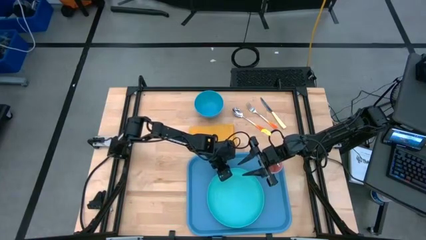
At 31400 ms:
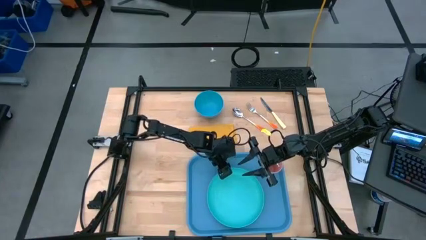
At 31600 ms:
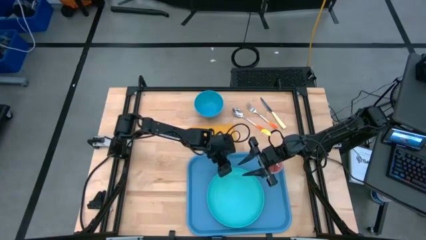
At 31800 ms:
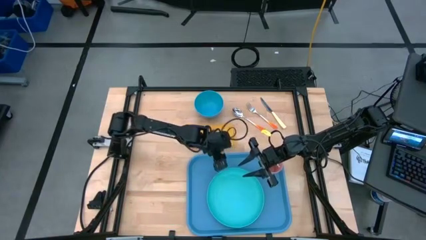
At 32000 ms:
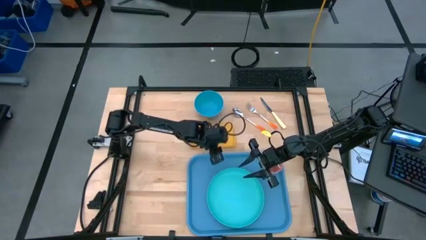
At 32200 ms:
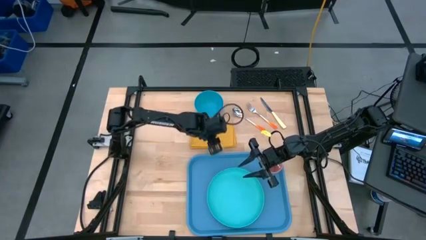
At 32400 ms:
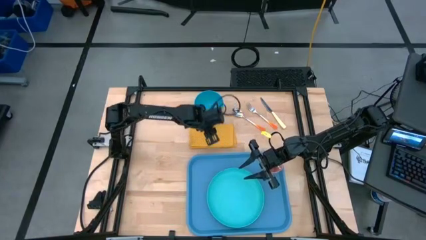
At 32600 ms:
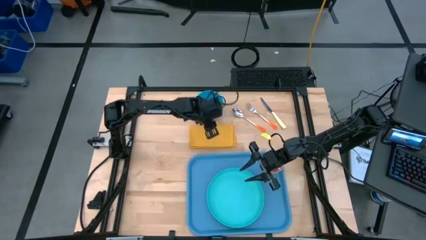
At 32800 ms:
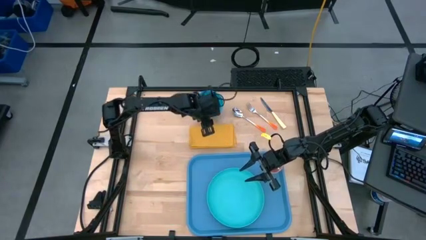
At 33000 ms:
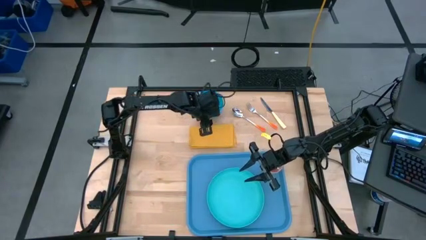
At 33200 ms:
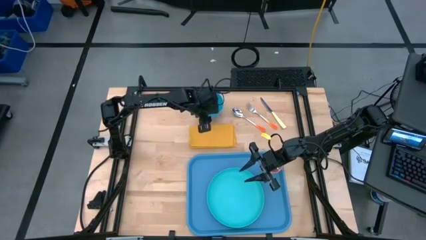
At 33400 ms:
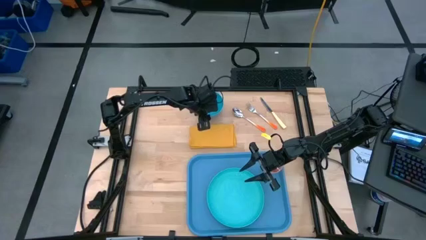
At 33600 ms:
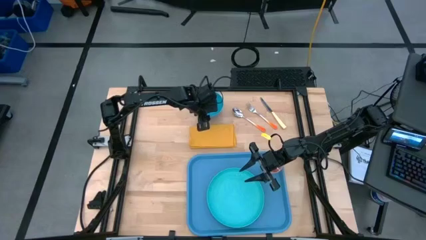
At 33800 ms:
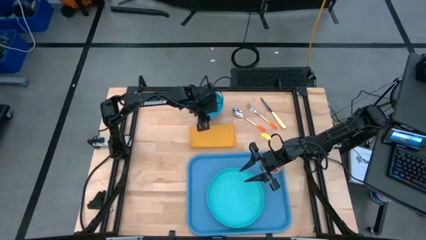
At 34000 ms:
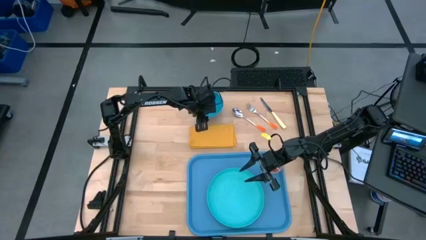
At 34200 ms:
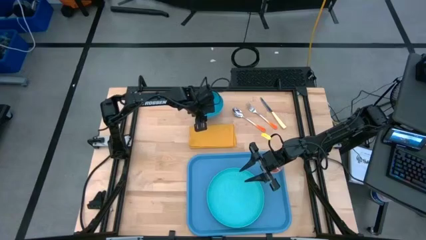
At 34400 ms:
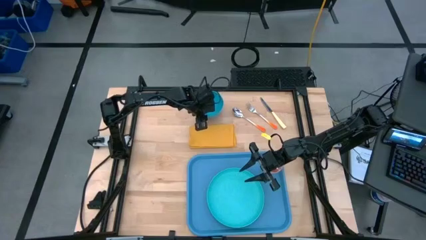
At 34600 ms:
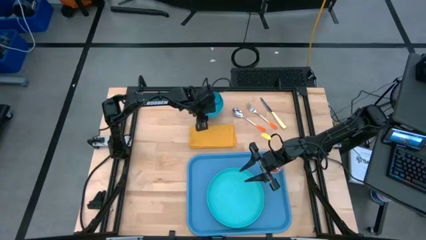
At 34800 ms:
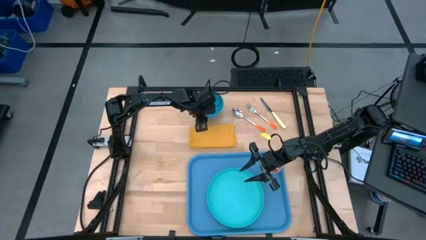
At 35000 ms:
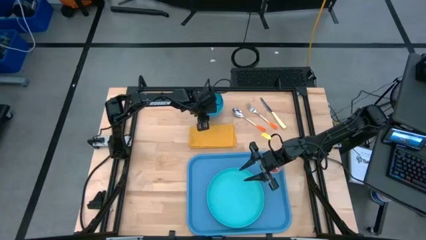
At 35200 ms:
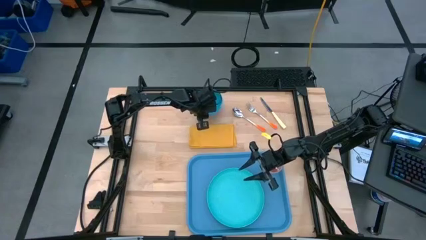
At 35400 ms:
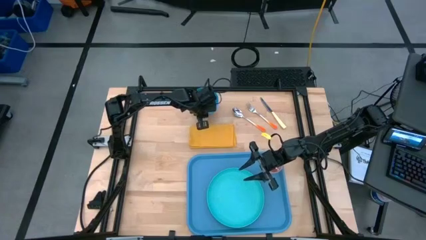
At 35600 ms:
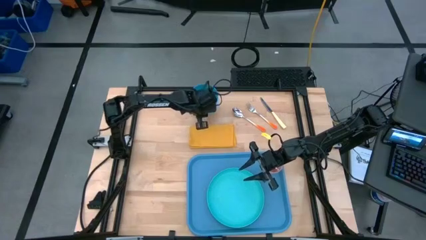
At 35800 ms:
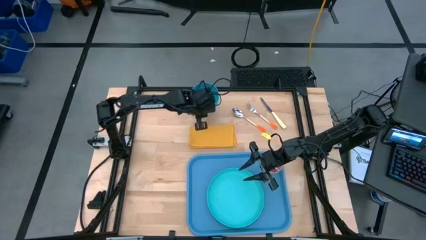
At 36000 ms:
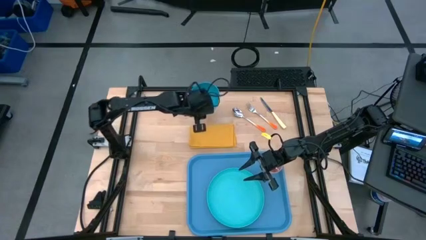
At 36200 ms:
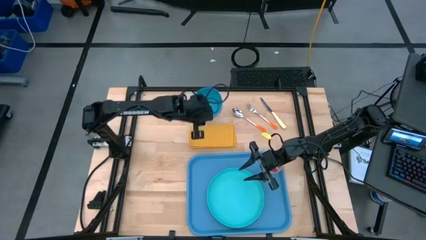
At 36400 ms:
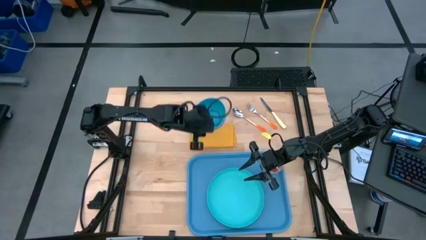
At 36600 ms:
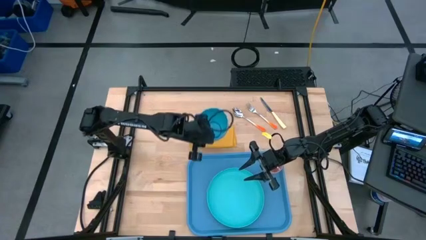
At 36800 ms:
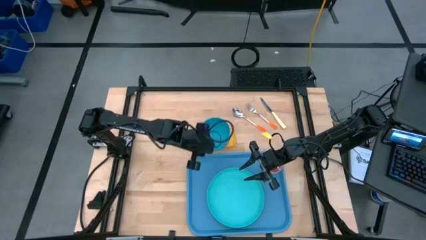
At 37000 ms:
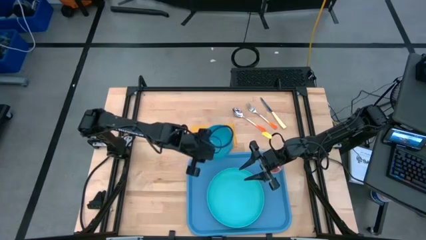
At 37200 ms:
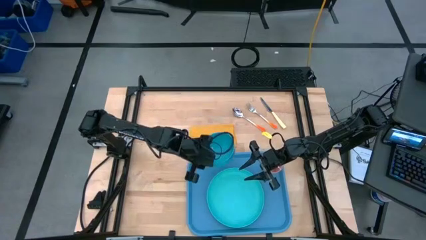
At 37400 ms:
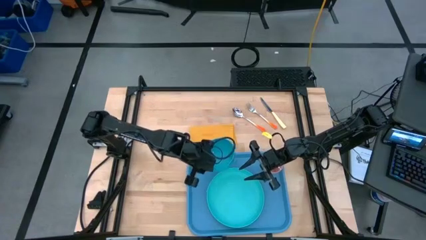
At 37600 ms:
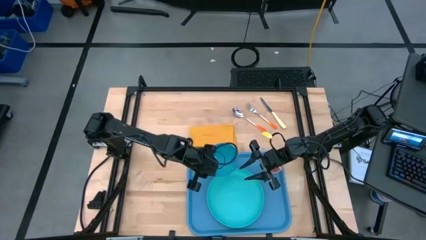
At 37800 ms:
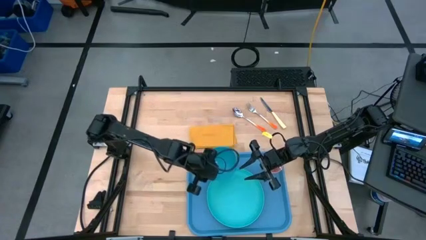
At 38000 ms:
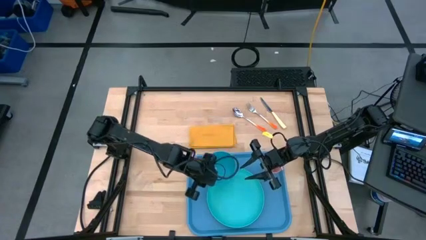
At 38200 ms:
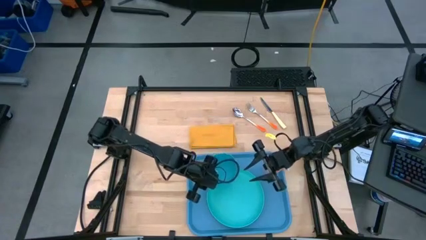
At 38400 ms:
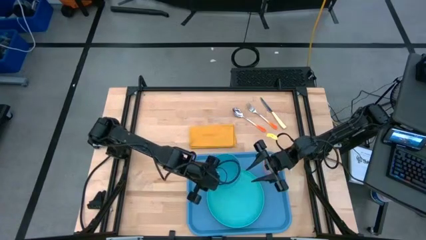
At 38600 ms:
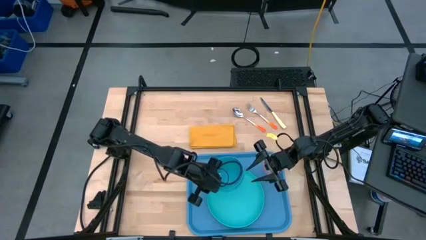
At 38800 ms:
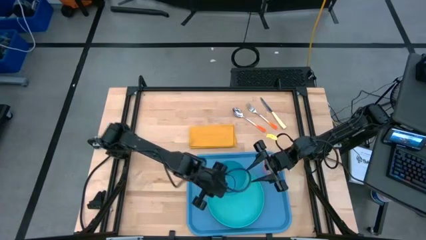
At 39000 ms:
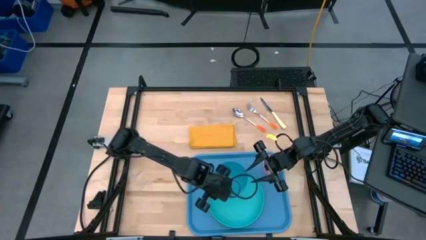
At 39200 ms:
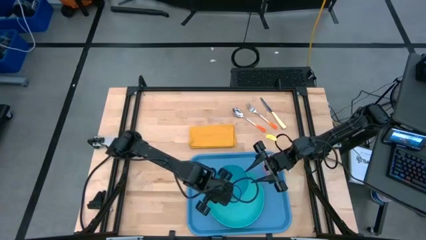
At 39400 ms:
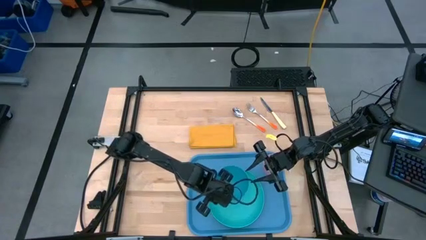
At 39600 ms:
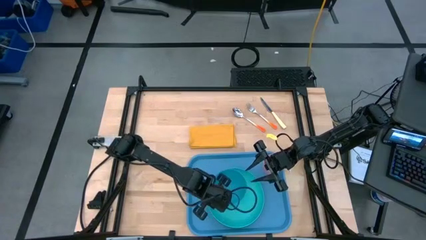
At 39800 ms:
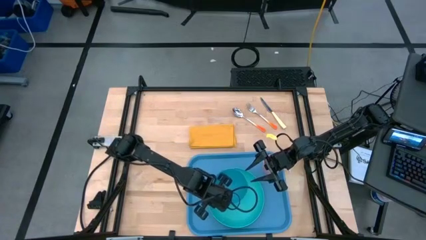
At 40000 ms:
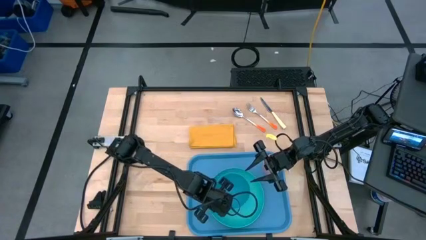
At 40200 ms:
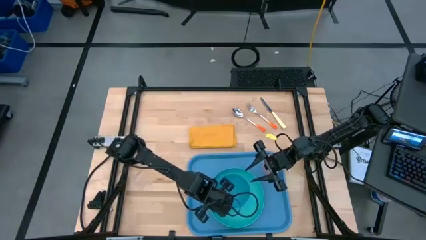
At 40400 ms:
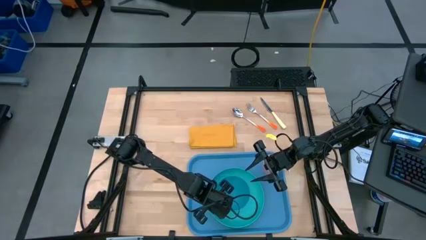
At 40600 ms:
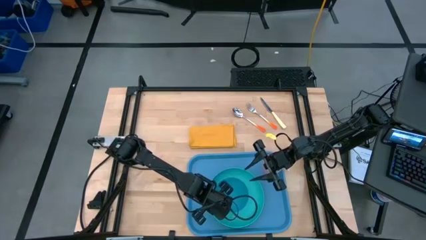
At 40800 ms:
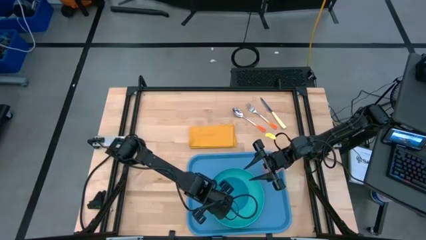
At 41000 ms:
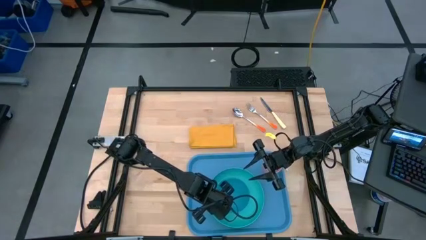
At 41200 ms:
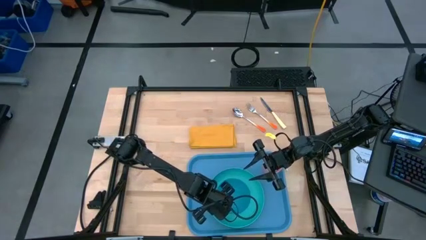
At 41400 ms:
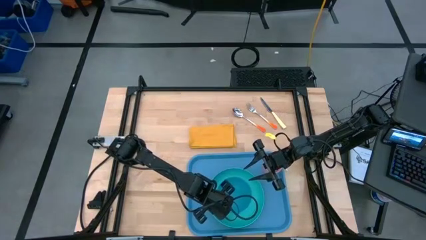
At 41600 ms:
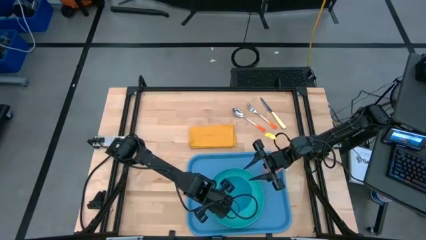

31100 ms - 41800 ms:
Task: Set up tray
Put the blue bowl on the blue plate

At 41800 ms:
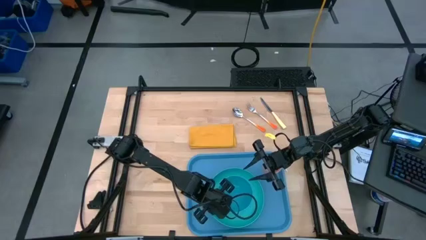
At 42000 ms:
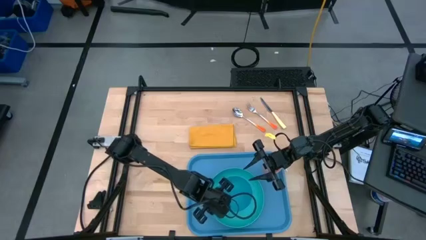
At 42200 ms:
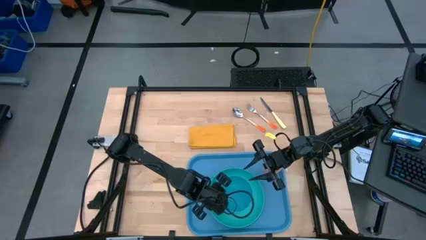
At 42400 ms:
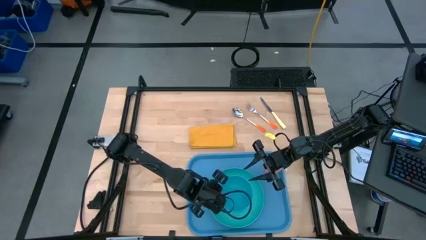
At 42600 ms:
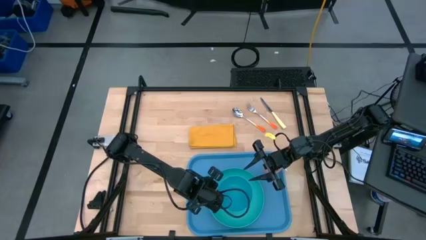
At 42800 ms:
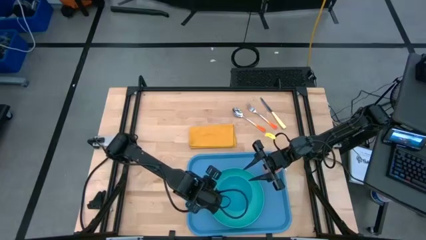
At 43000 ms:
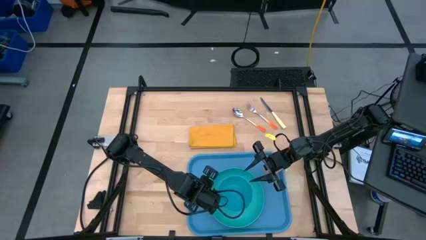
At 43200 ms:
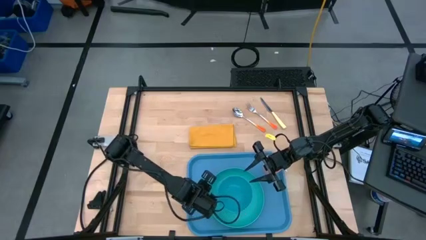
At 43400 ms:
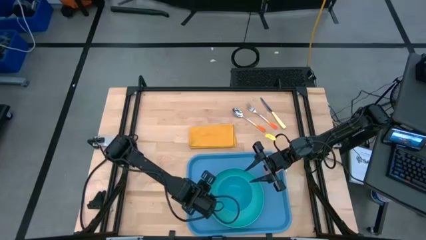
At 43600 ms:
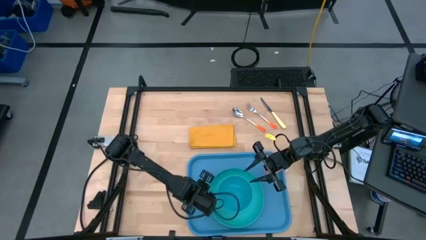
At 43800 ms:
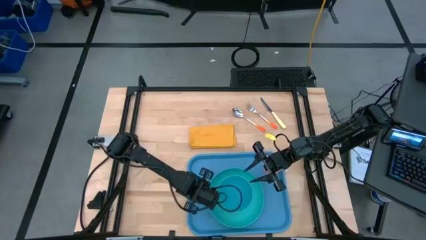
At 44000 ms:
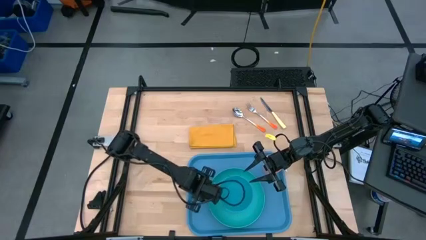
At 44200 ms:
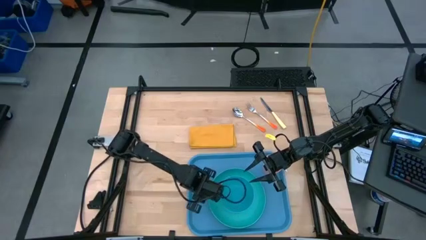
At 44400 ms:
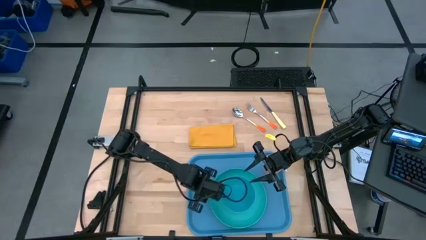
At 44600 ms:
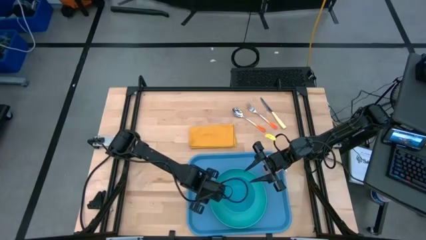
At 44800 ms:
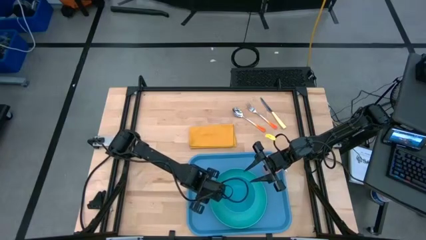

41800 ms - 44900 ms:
Adjust the blue plate on the blue serving tray

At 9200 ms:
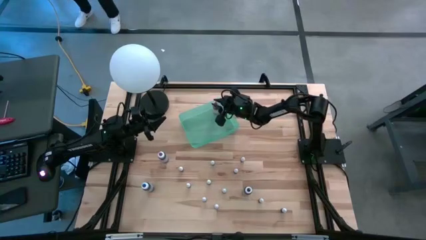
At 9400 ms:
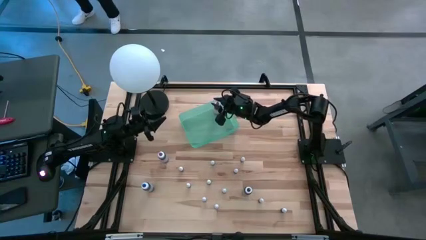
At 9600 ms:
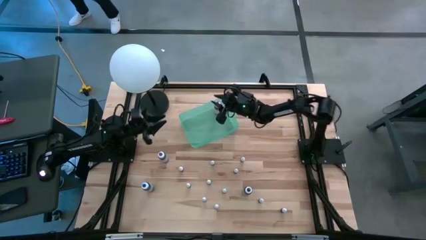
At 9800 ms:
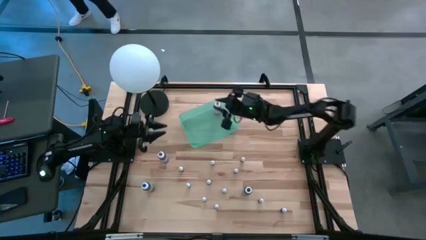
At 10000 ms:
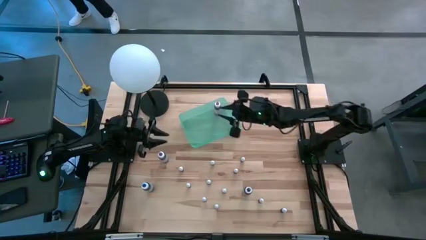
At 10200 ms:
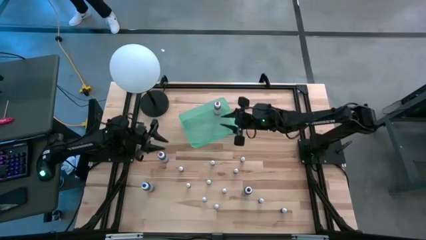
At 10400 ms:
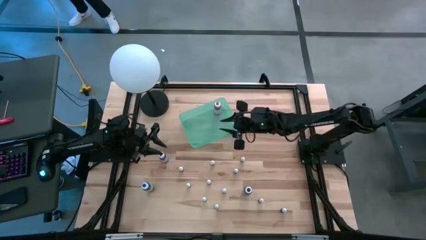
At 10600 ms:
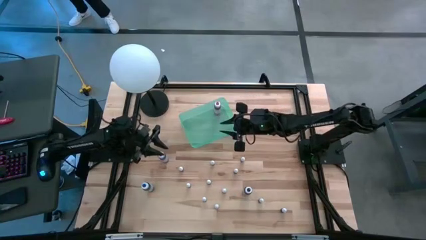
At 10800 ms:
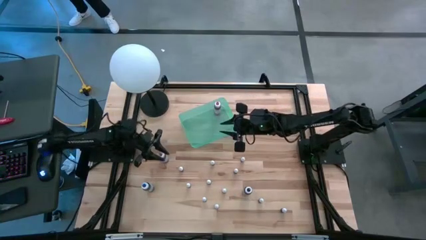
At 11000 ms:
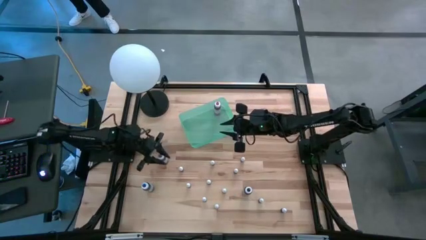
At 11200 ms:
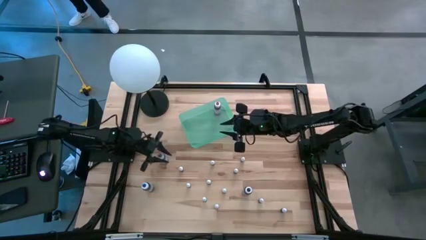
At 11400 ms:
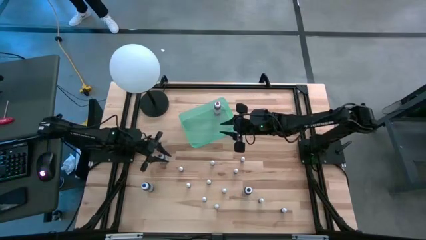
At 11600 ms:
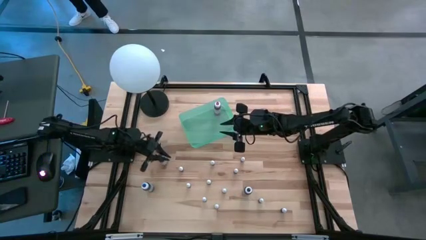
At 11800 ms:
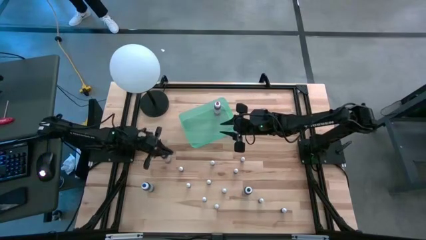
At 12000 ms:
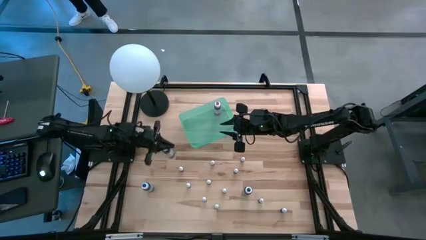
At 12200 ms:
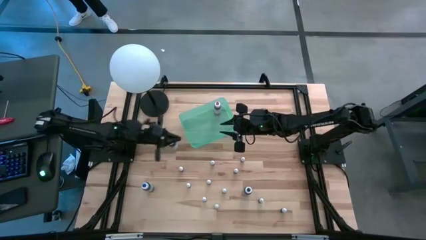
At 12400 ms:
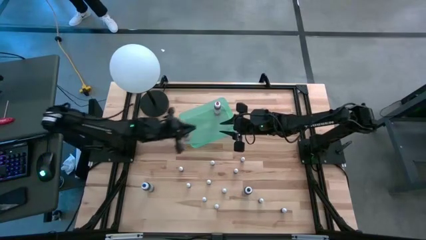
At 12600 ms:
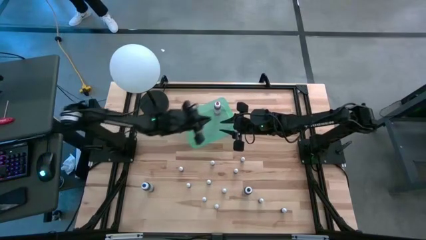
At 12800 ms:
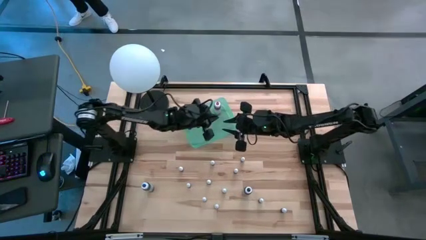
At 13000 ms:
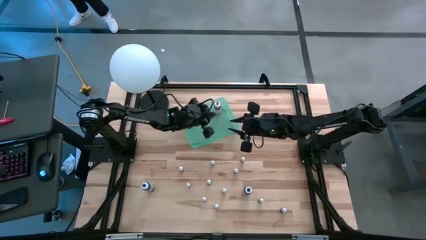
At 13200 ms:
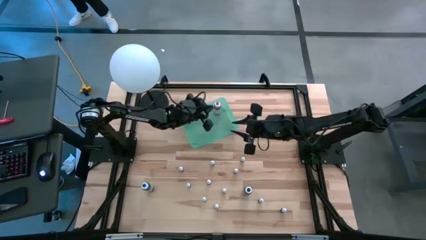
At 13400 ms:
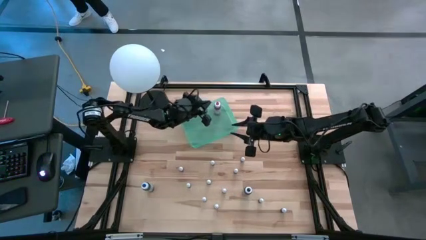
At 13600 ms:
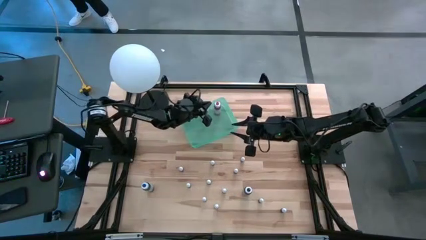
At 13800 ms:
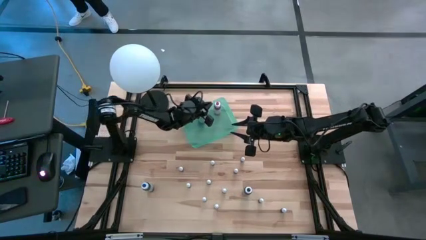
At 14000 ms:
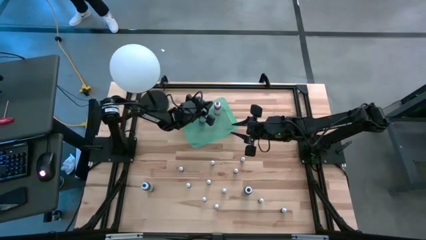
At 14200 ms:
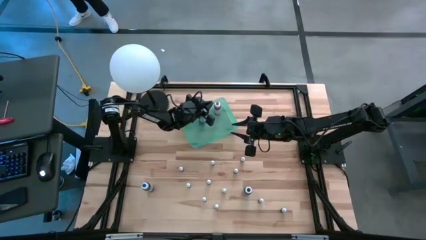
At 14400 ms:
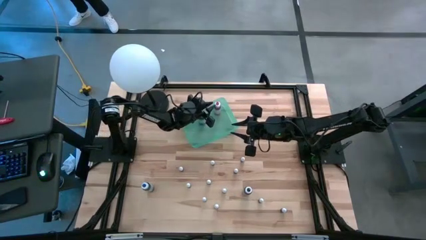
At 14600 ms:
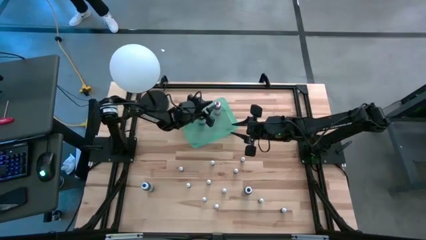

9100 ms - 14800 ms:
Task: Pick & Place food coloring
Put the large purple bottle into the blue bin
